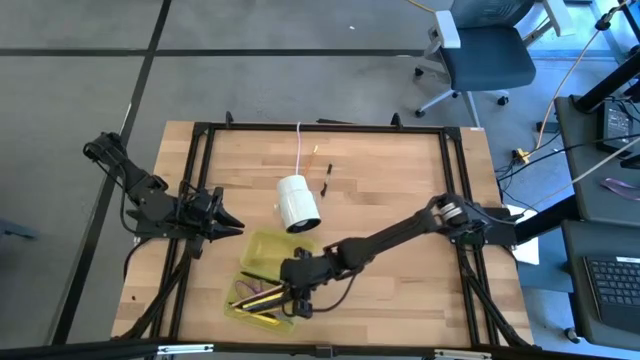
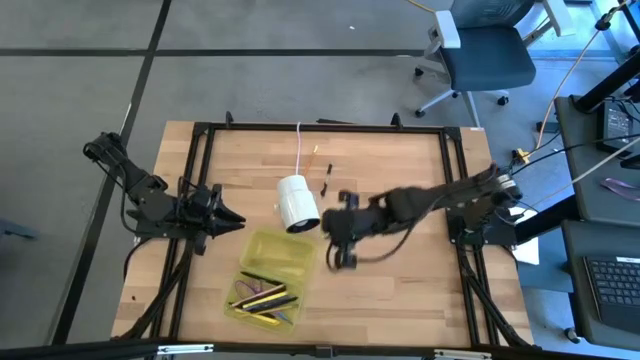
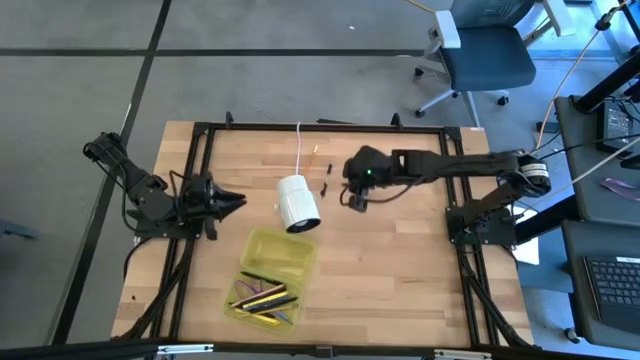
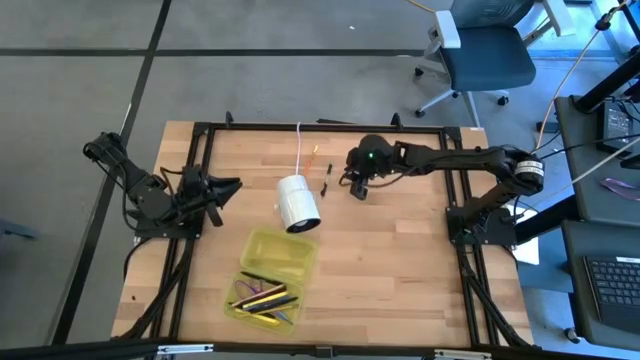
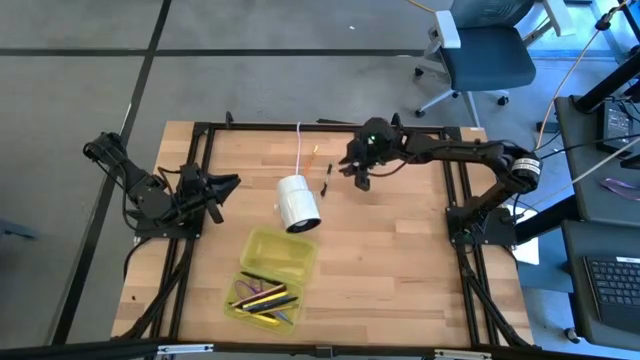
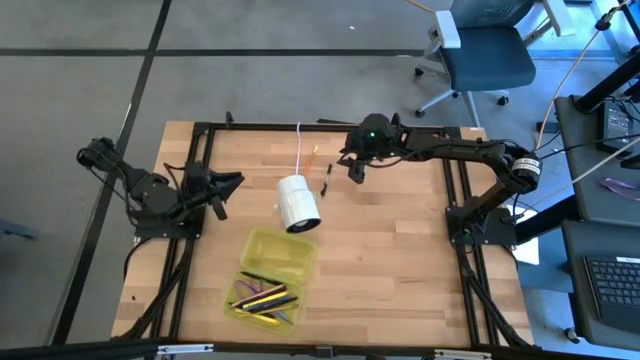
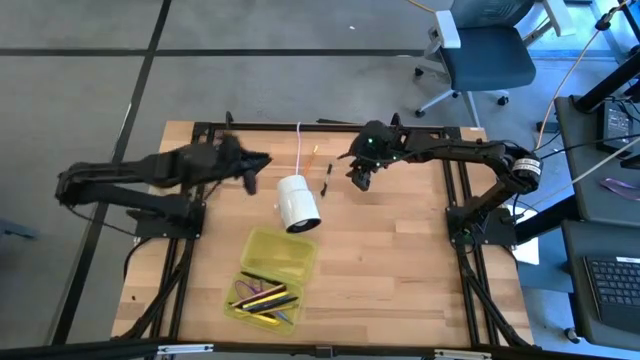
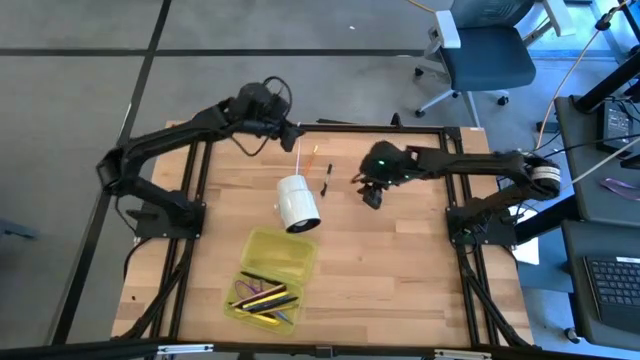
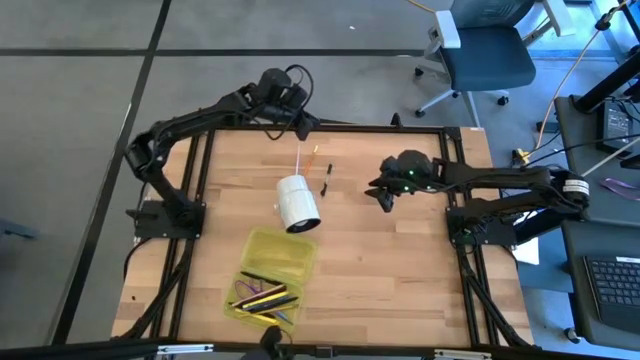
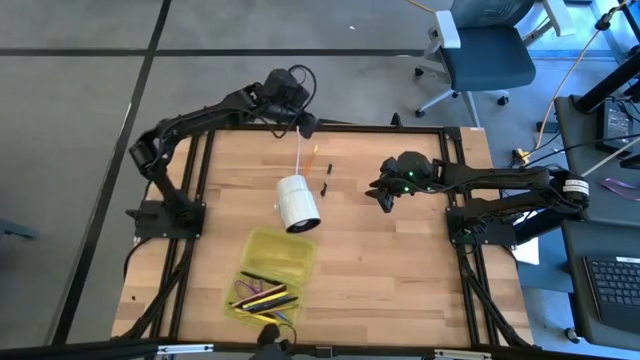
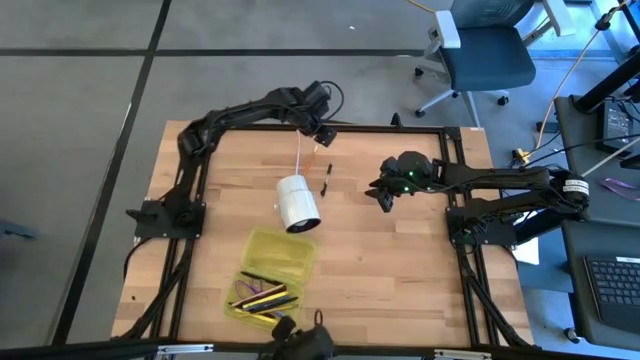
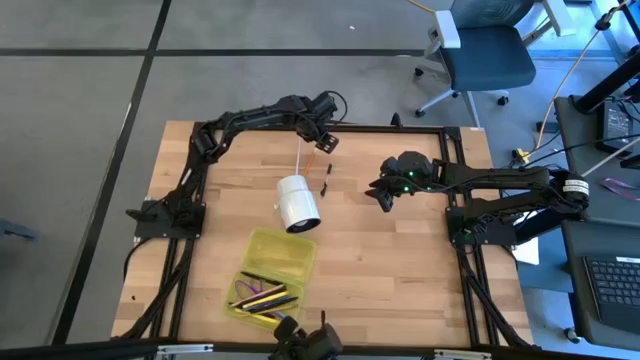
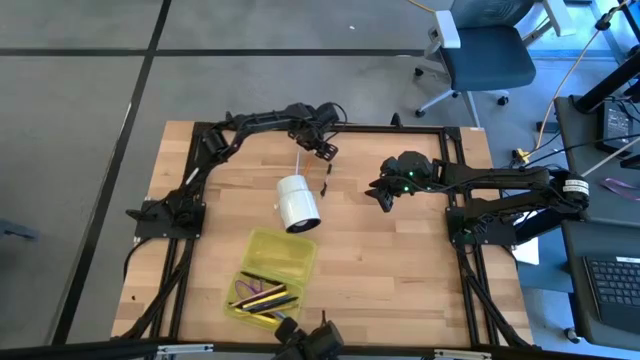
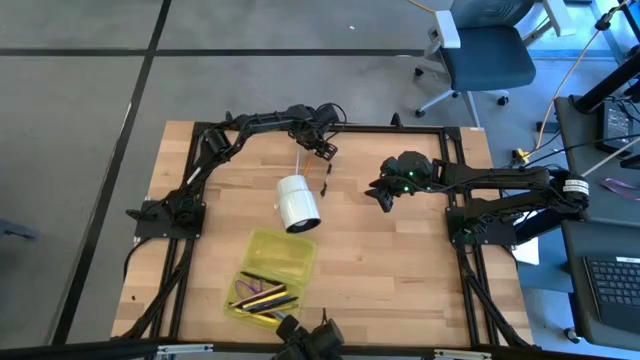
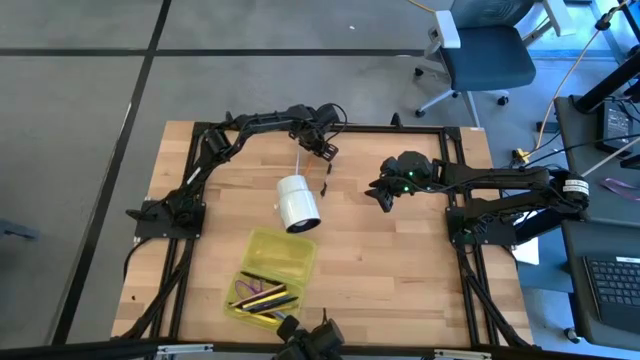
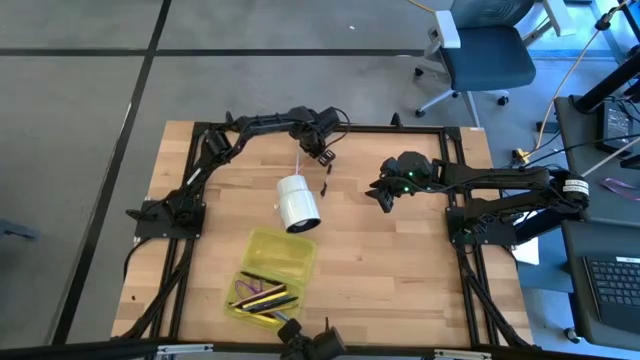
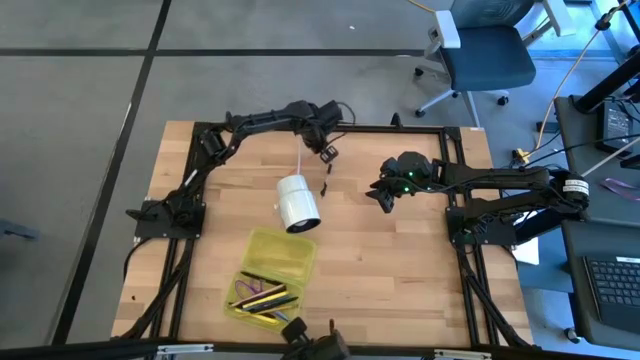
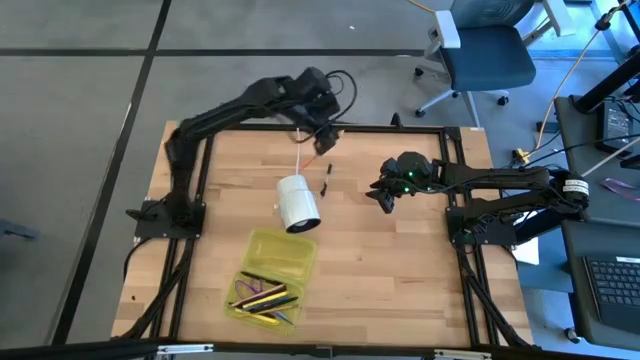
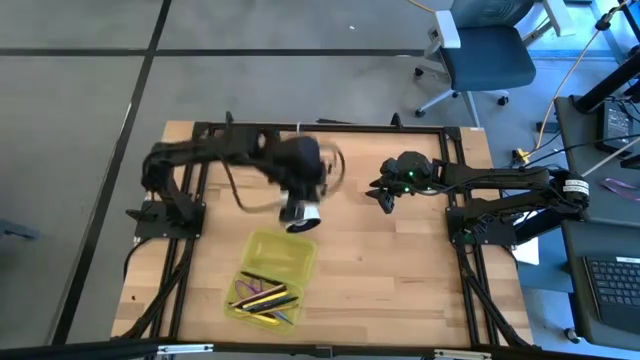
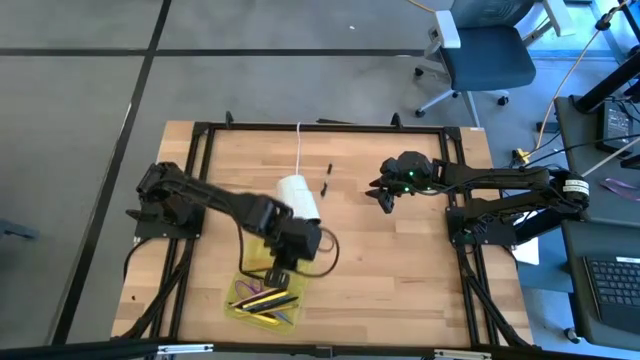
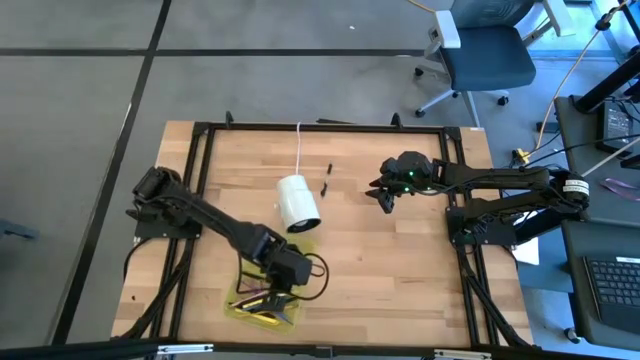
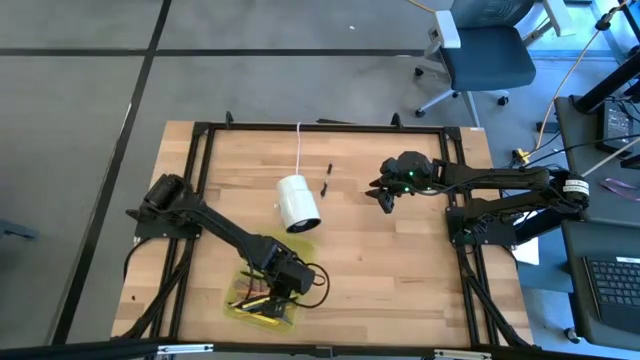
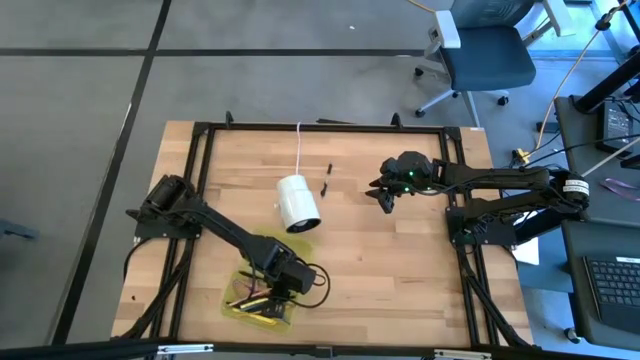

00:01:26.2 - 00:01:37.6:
Task: Pick & place school supplies into a supply box
Put the orange pencil into the supply box

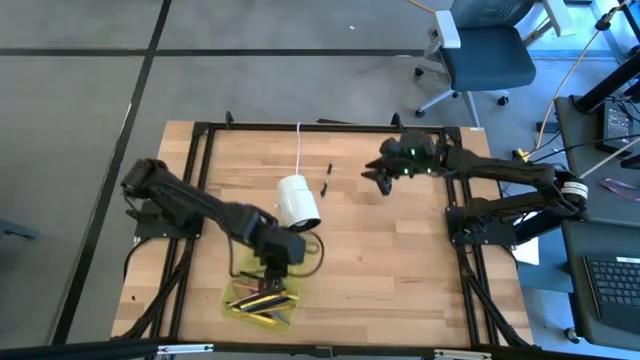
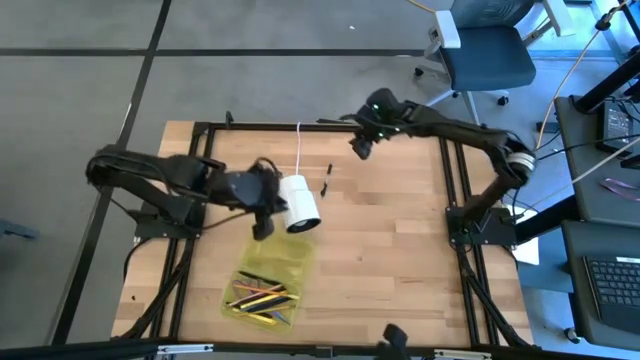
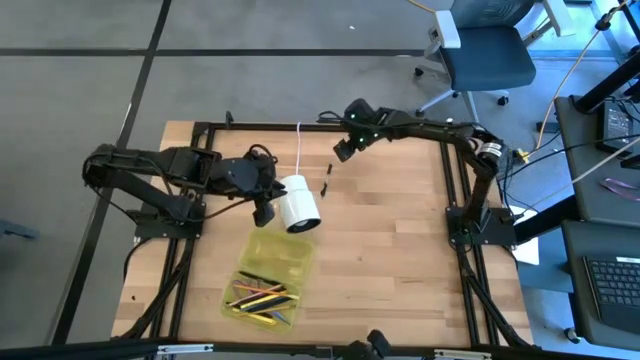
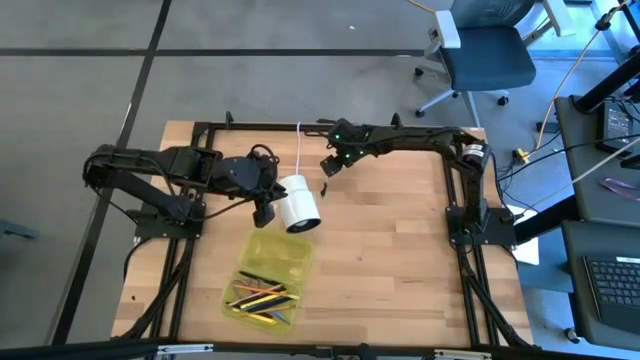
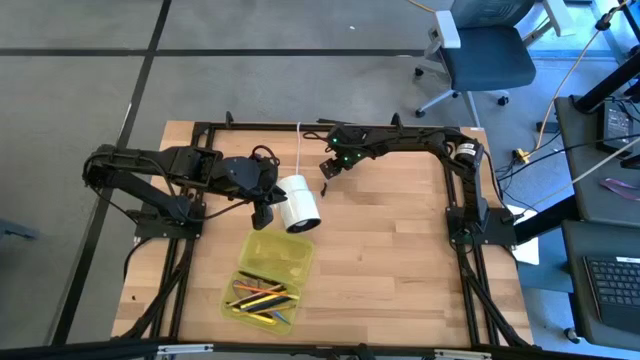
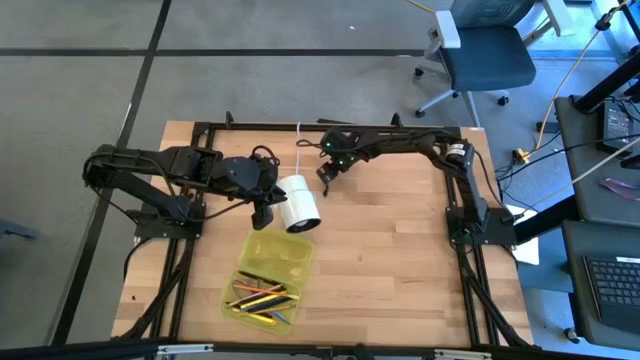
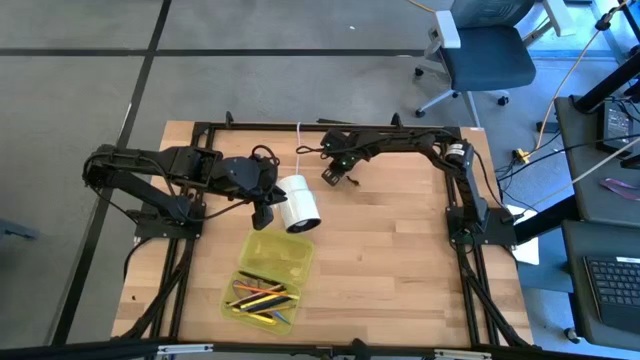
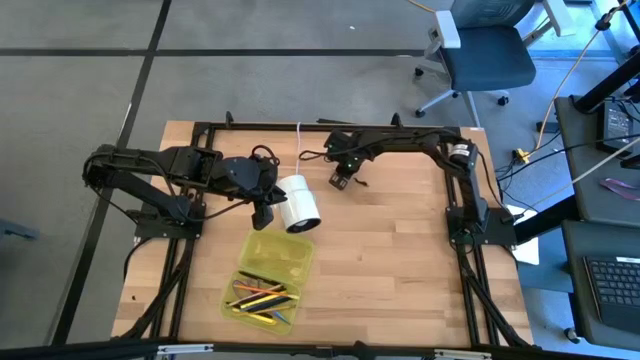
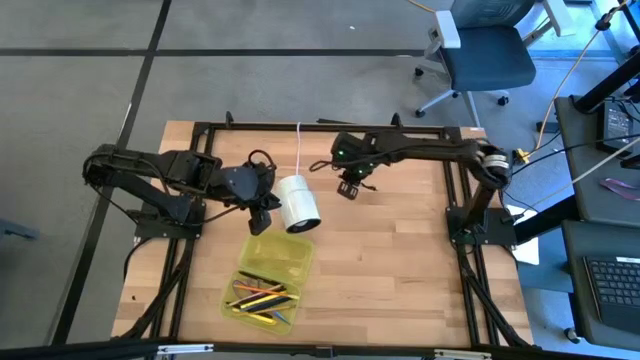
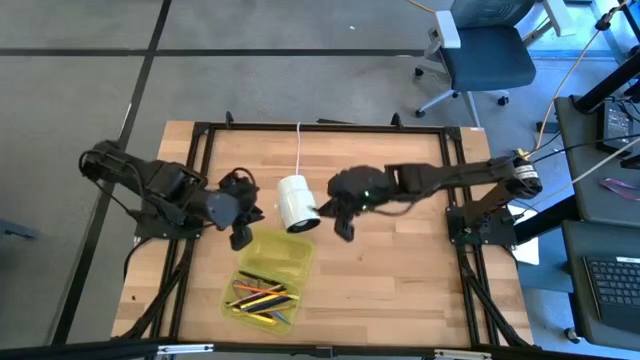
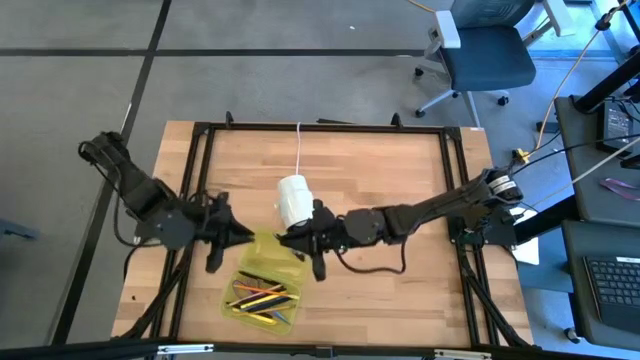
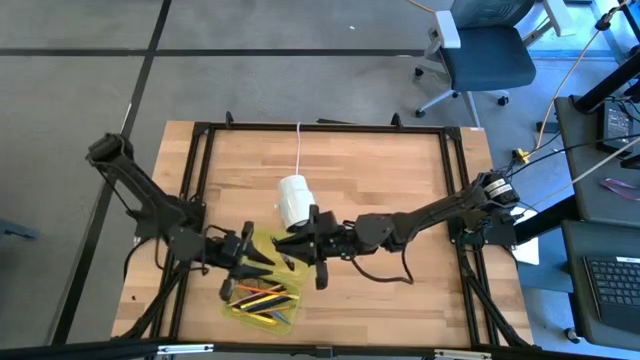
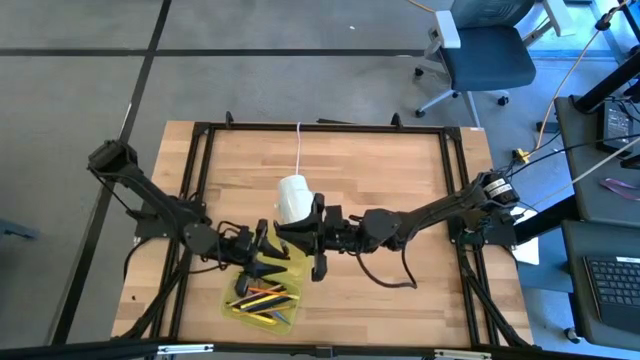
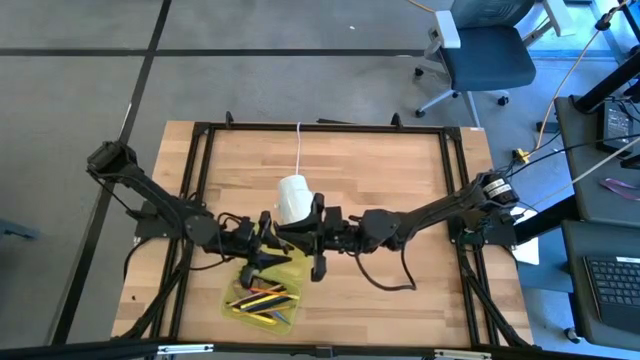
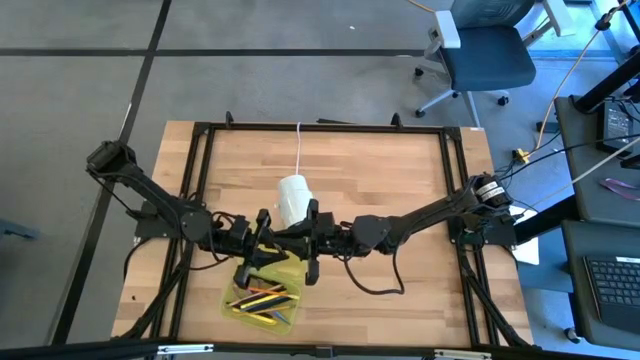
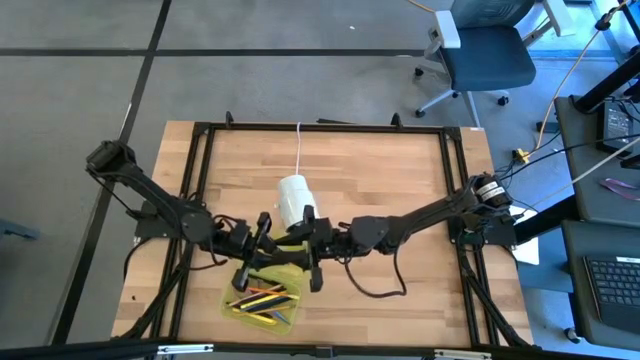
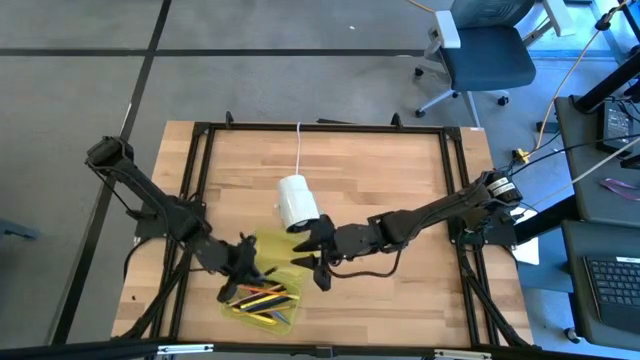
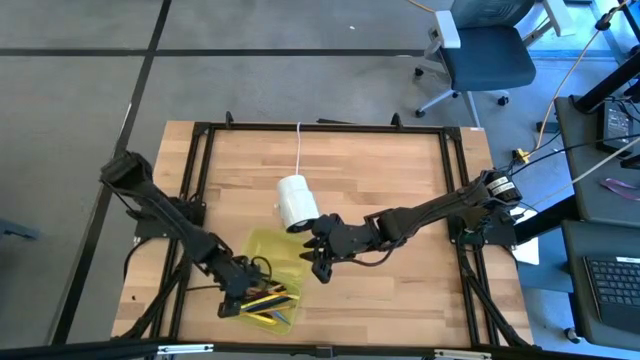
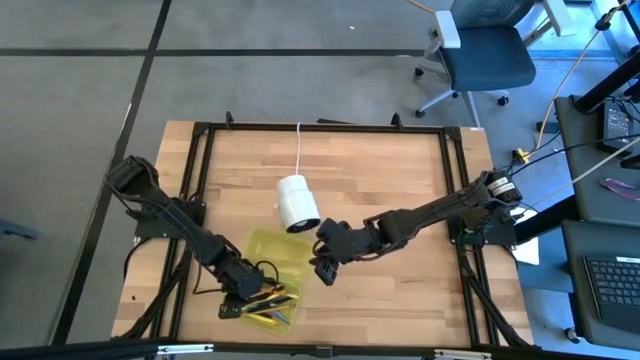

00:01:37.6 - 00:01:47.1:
Put the transparent black pen into the supply box
